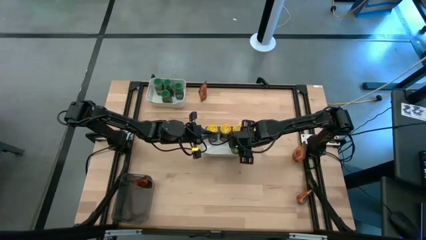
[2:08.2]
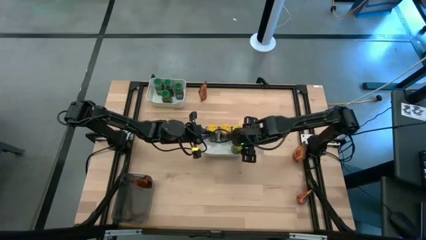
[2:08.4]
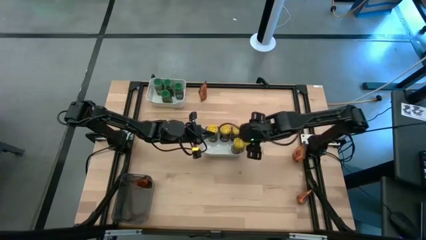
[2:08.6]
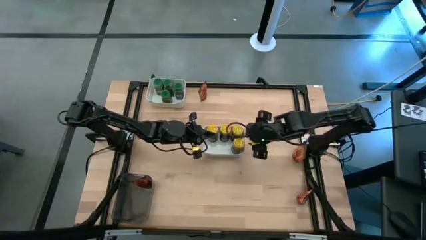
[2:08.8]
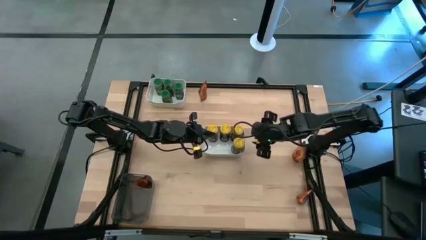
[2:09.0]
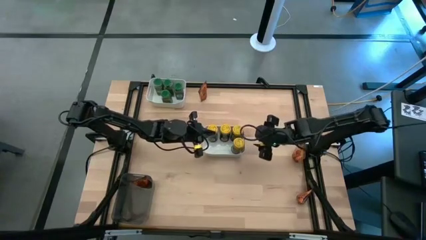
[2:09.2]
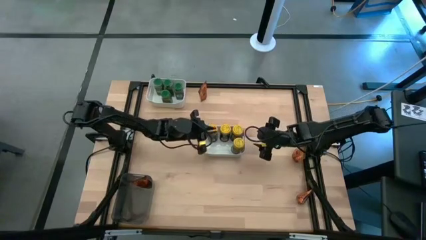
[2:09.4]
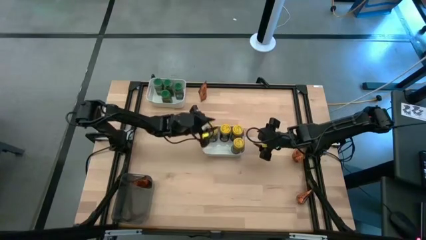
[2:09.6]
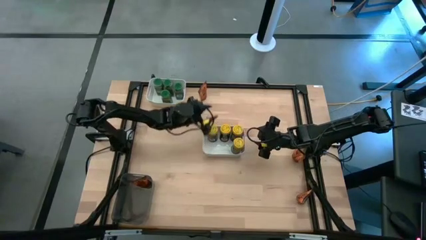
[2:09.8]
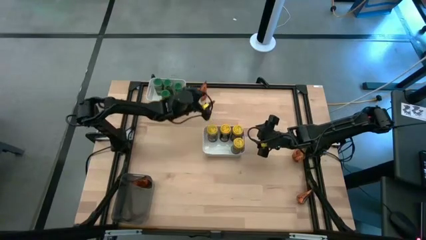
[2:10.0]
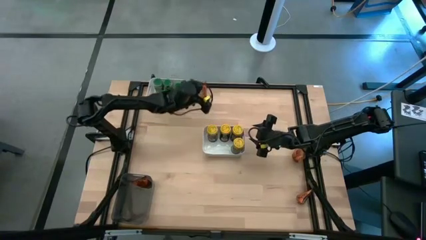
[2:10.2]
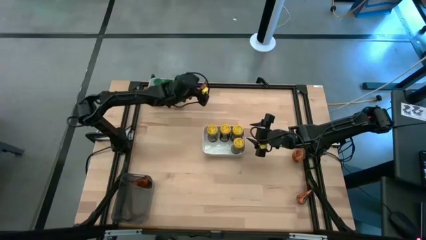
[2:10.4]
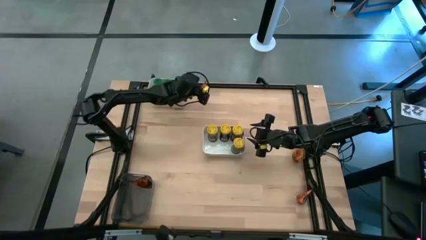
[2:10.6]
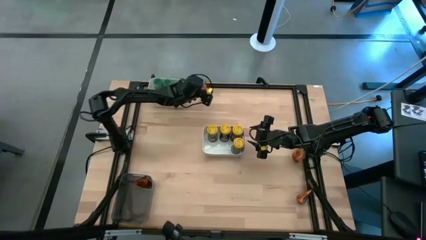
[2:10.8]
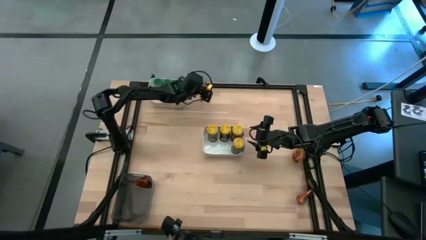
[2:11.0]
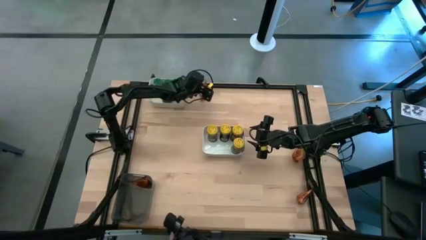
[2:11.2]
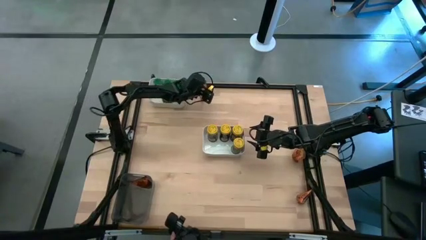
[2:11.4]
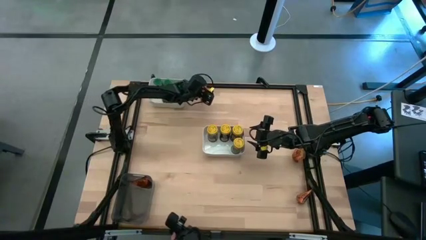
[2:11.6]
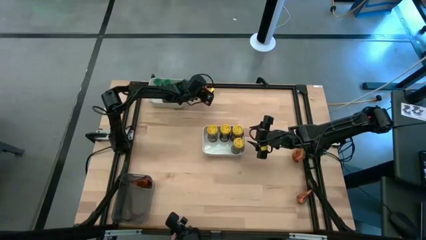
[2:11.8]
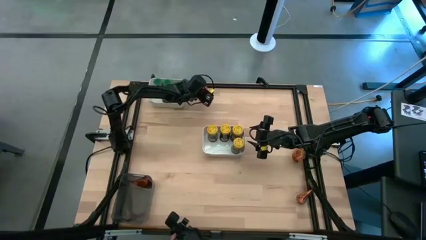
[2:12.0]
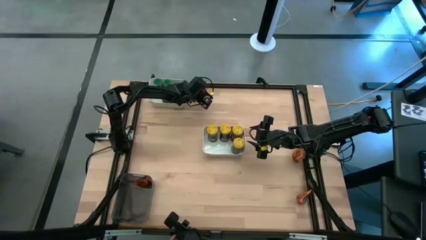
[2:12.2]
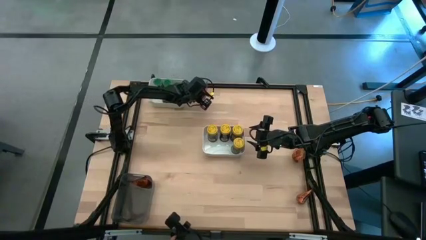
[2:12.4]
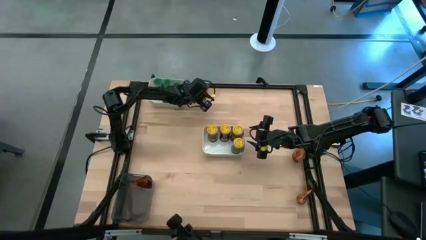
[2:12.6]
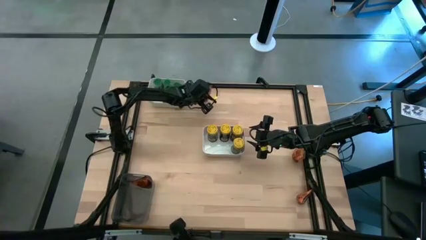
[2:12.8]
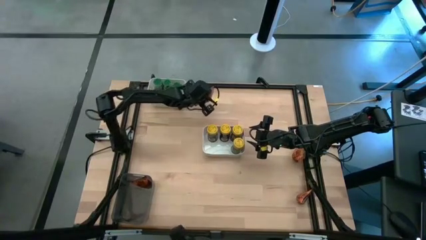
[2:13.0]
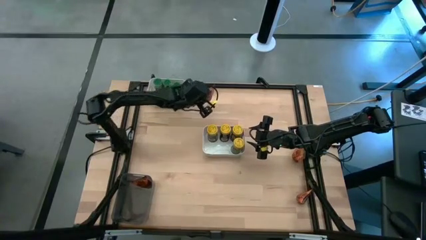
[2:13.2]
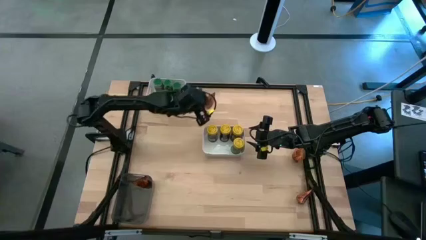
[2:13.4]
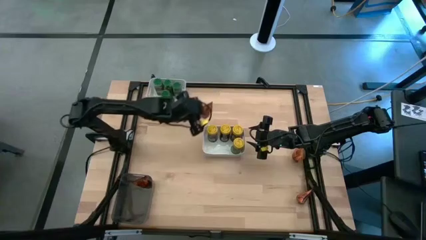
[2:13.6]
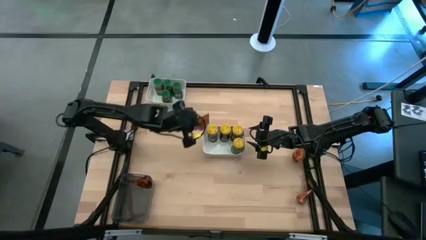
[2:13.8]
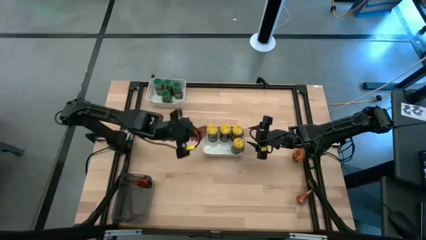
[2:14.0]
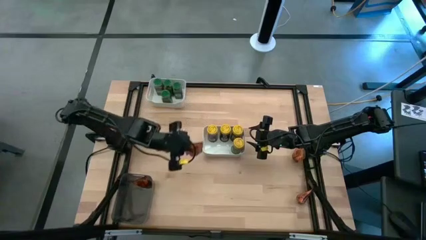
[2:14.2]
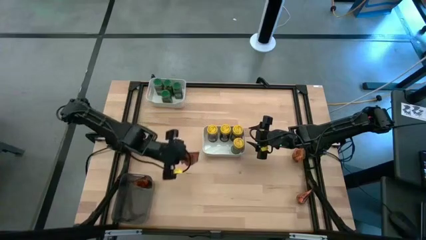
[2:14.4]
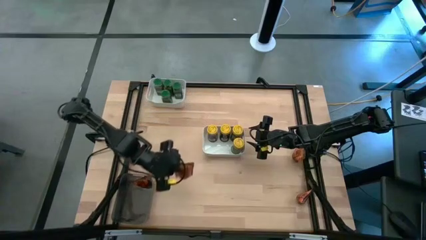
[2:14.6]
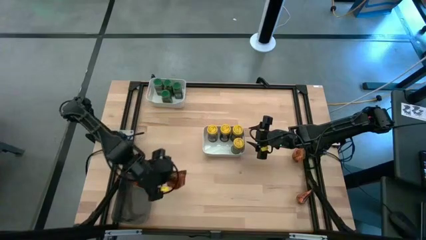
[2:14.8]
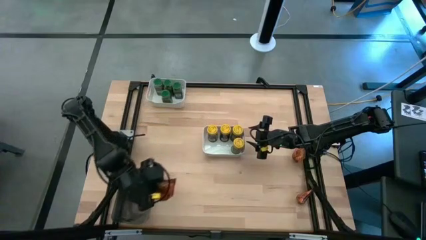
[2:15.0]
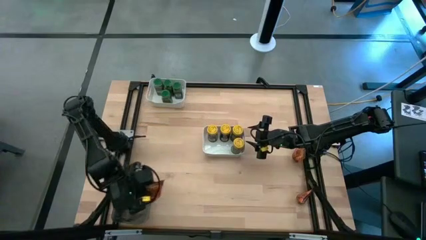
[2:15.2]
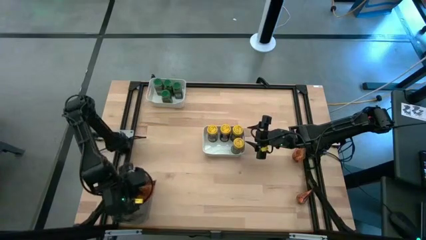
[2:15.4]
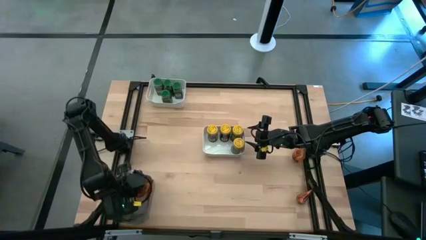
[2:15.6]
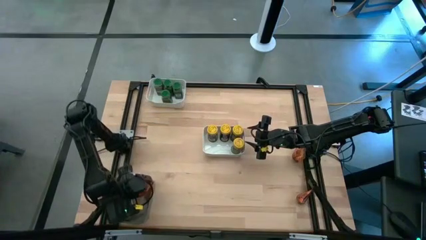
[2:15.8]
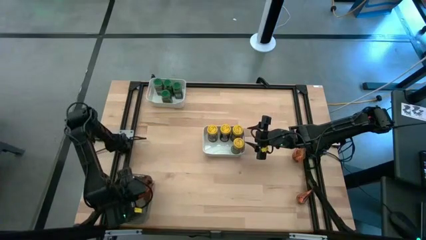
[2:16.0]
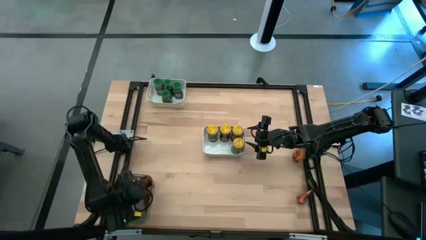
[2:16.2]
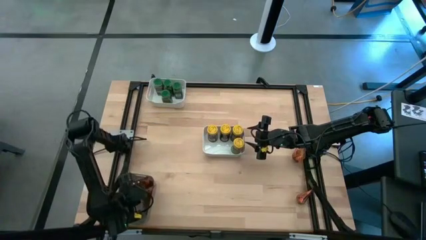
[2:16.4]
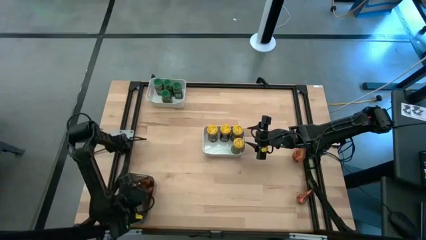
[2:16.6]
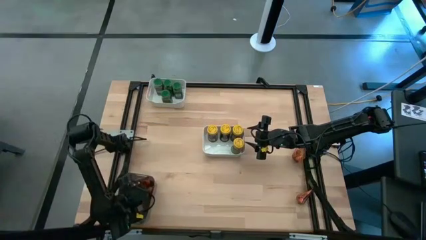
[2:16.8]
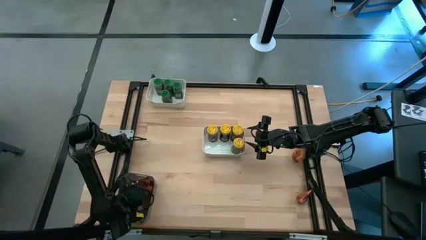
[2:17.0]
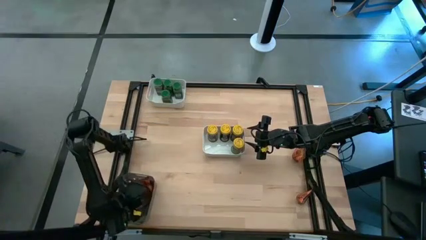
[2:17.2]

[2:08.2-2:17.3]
Task: Sort spices by type
Put the orange seasoning pack into the black bin

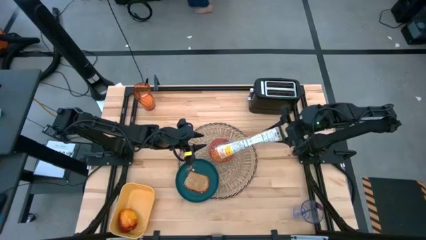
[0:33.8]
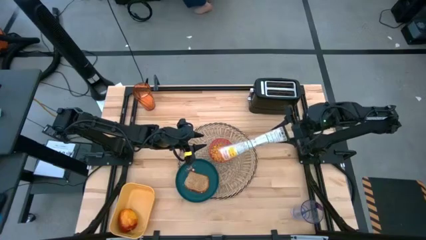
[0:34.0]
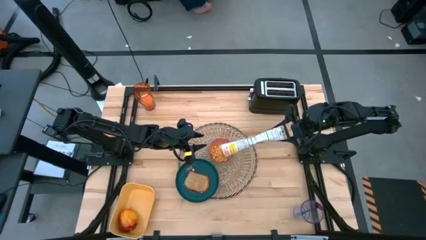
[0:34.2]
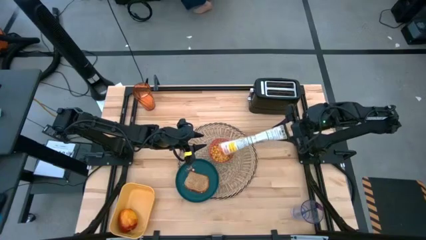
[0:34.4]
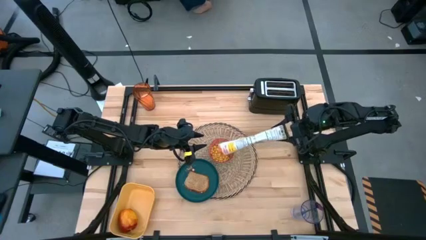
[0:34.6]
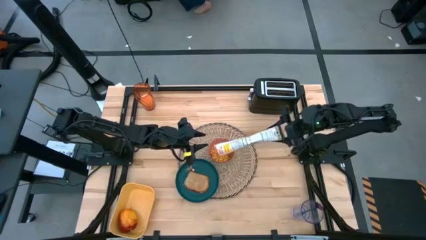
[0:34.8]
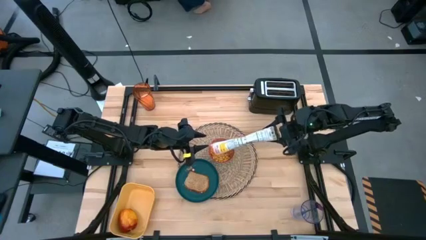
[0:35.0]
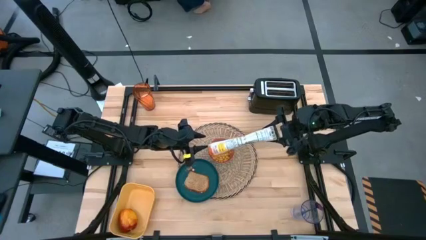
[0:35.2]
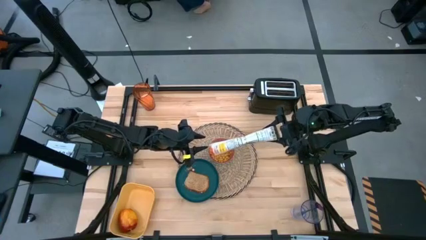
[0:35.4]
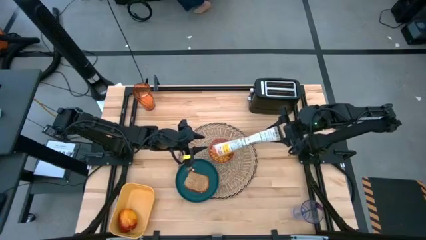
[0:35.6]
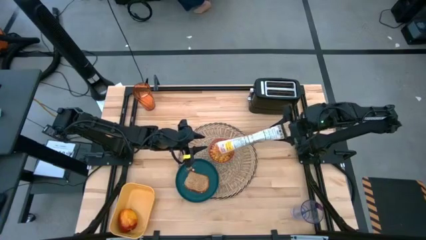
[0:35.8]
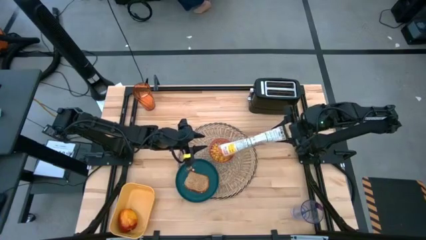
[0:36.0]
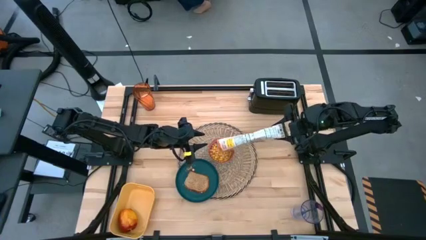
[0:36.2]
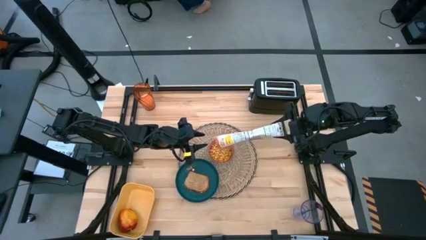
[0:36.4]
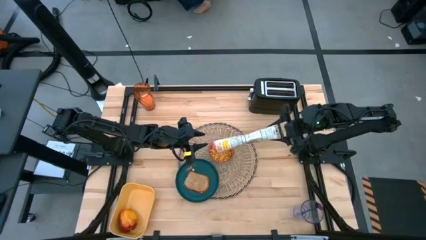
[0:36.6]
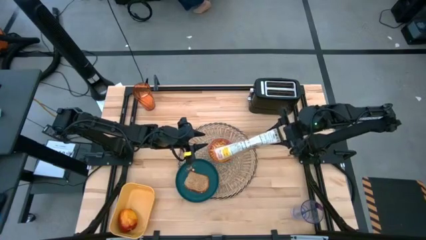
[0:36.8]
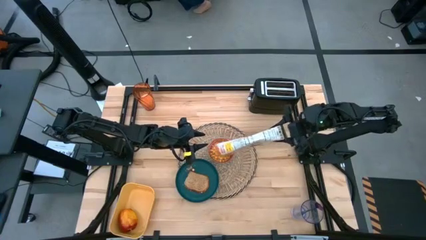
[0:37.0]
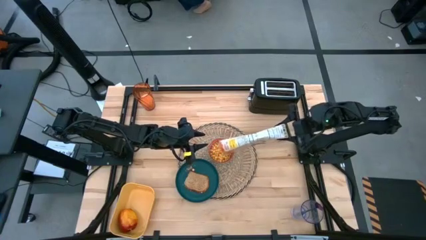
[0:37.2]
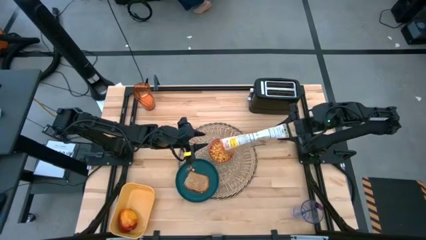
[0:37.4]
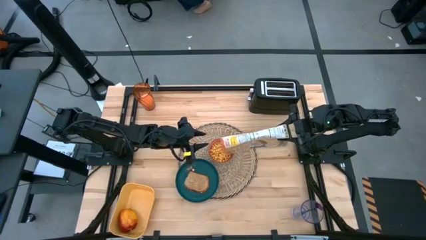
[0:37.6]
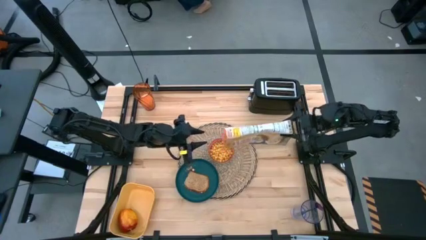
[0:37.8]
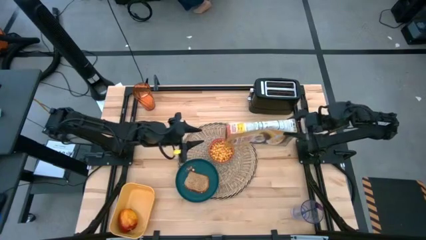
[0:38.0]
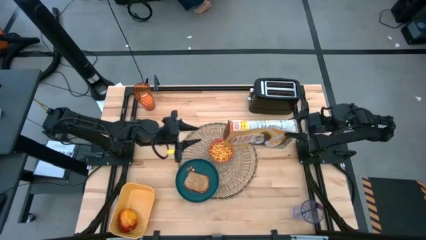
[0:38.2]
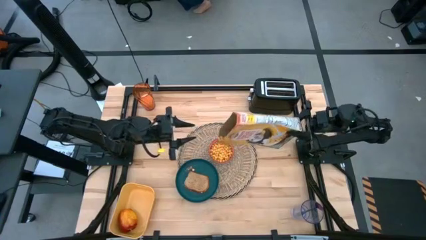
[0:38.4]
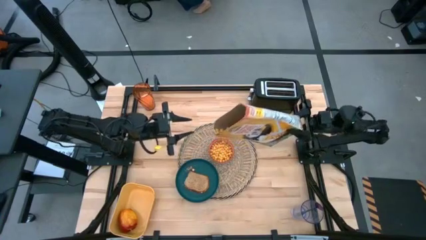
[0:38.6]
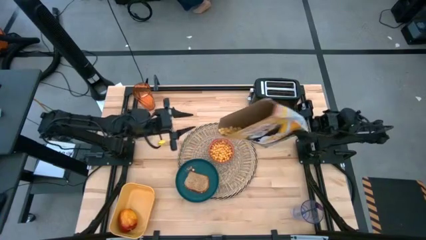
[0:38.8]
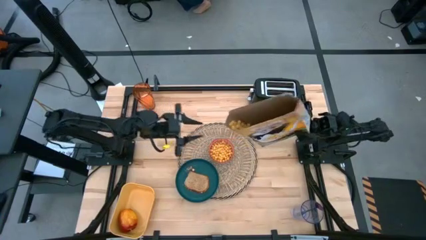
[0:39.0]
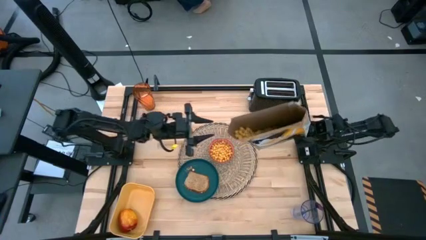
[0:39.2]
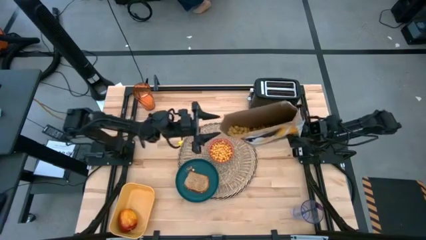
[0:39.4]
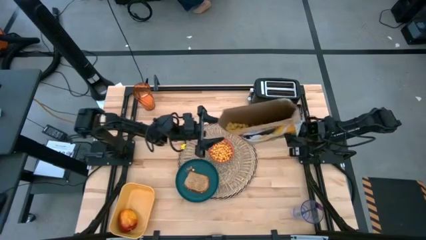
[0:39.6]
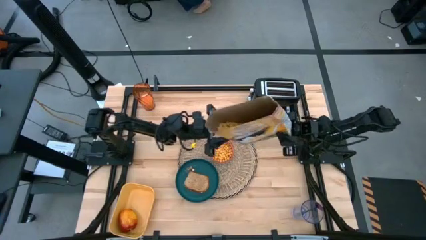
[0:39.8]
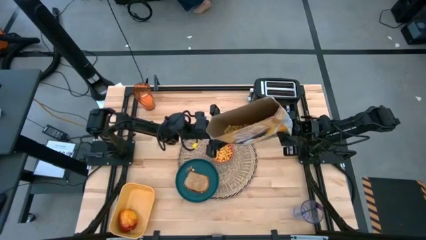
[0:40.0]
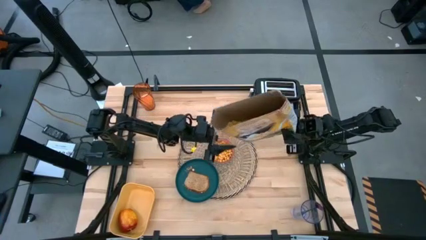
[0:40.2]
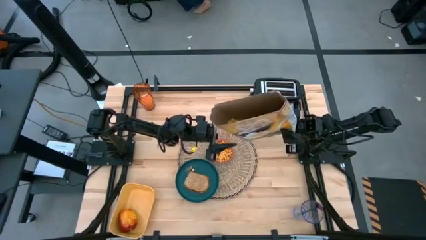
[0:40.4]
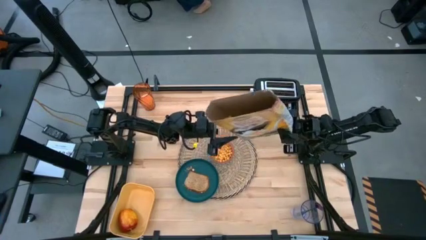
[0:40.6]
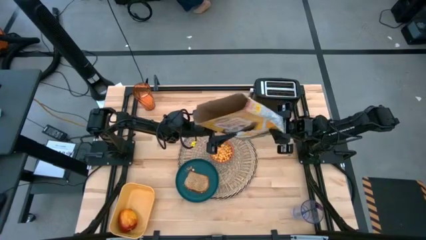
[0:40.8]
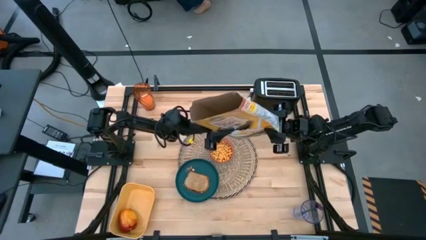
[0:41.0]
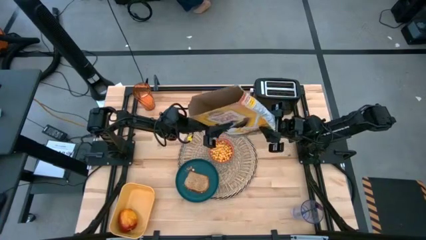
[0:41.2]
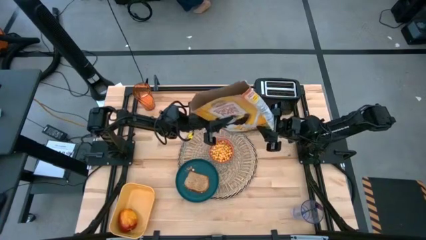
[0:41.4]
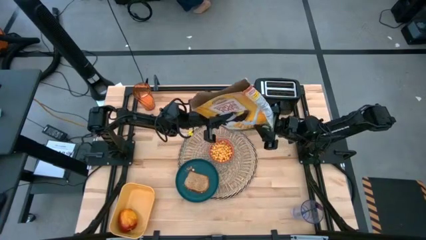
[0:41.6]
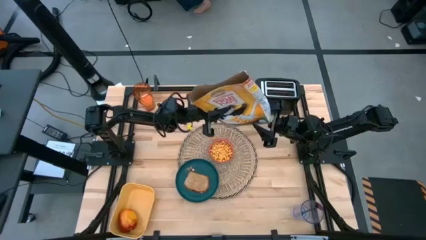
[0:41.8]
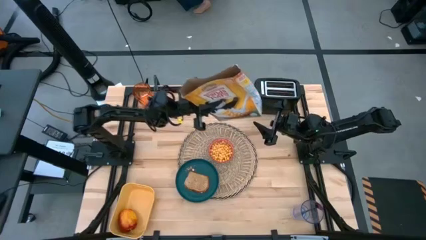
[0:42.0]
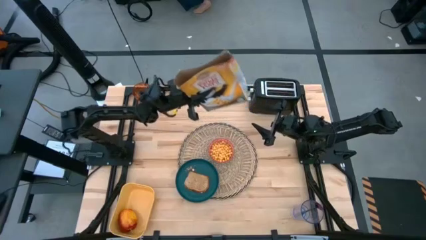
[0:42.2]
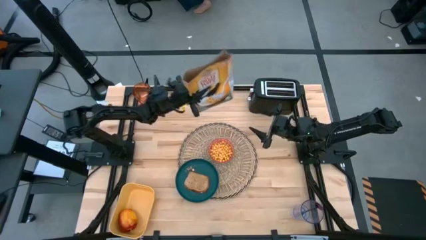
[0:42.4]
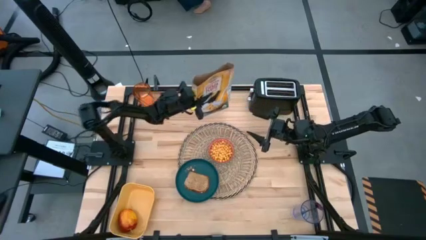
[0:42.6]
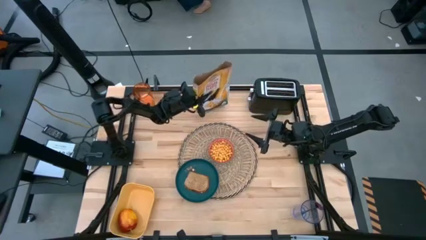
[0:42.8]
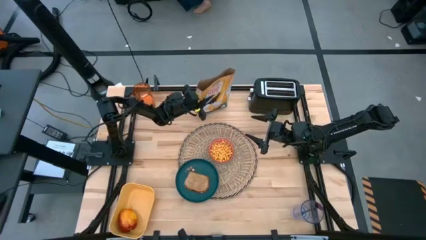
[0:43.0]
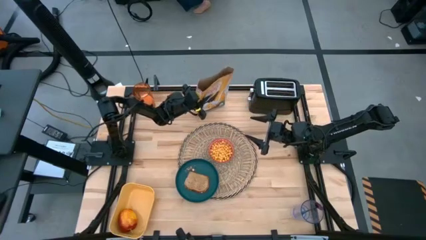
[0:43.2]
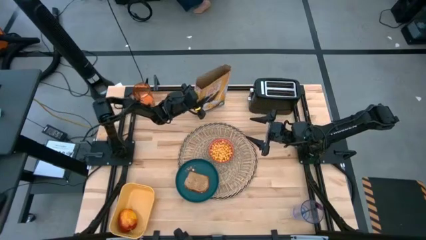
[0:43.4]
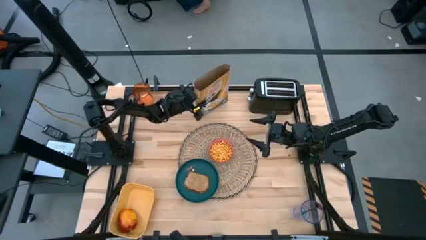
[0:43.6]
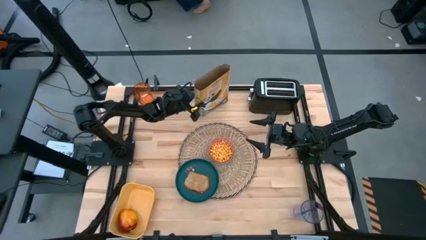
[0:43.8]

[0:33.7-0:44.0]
Task: Arrange a breakfast setting
Pour the cereal from the yellow cereal box into the red patterned bowl
